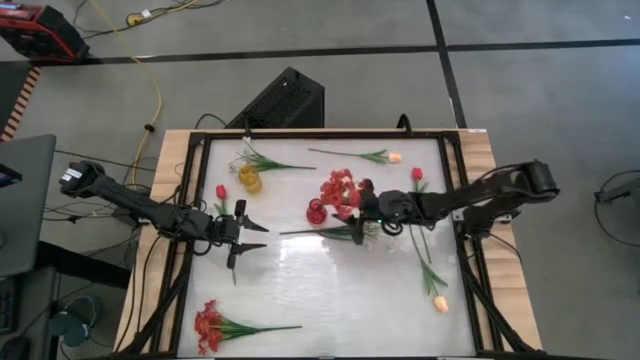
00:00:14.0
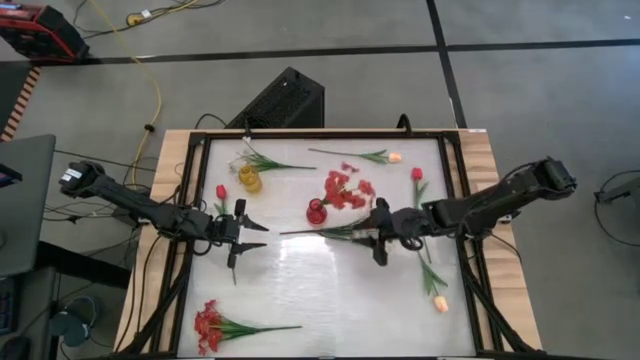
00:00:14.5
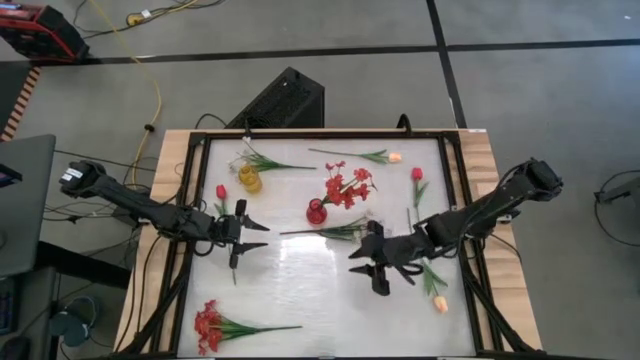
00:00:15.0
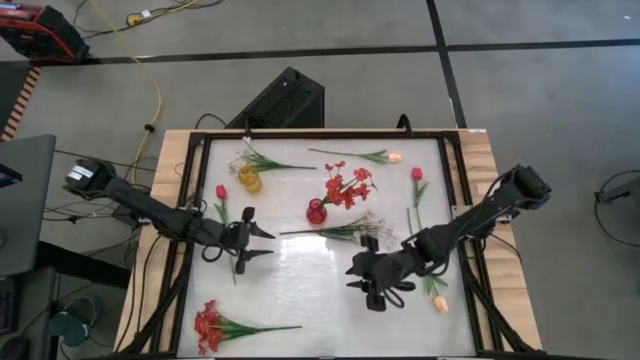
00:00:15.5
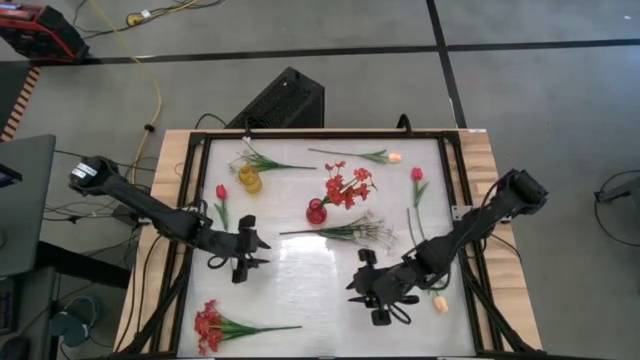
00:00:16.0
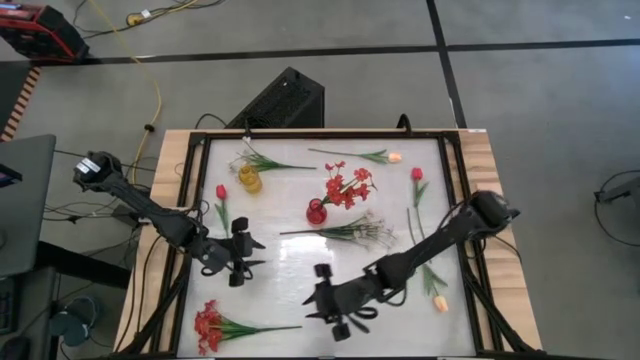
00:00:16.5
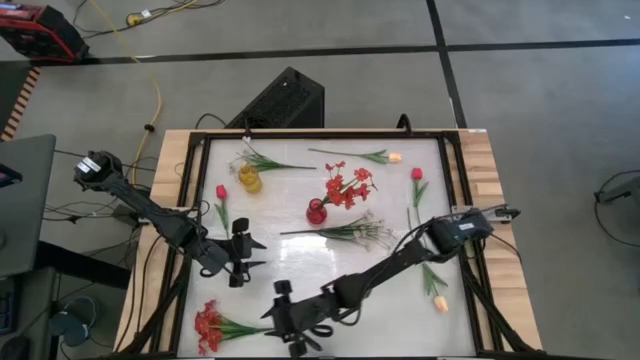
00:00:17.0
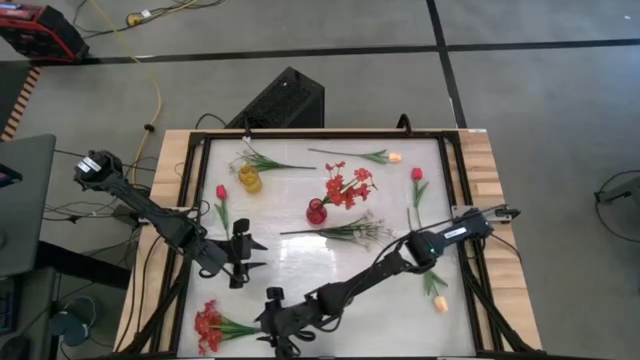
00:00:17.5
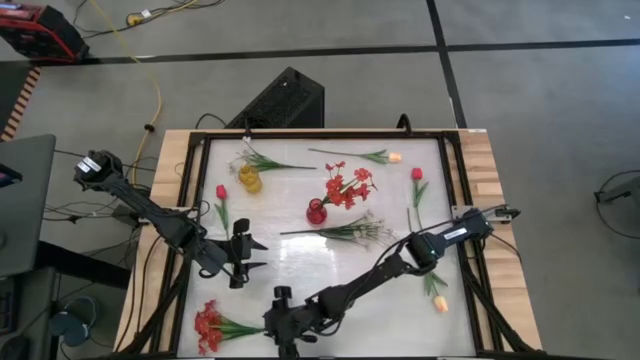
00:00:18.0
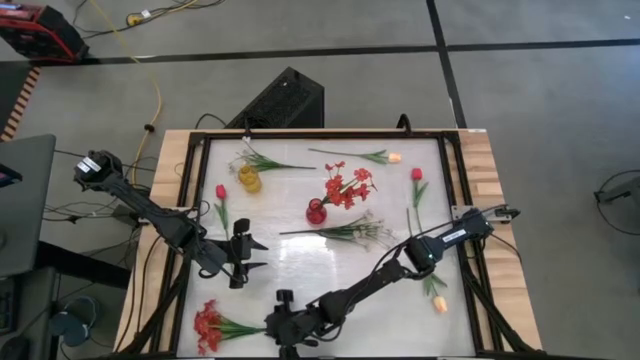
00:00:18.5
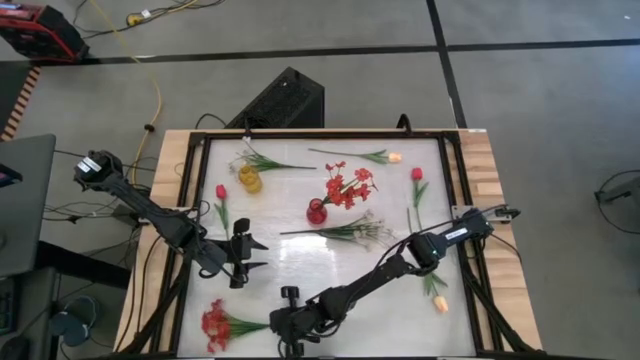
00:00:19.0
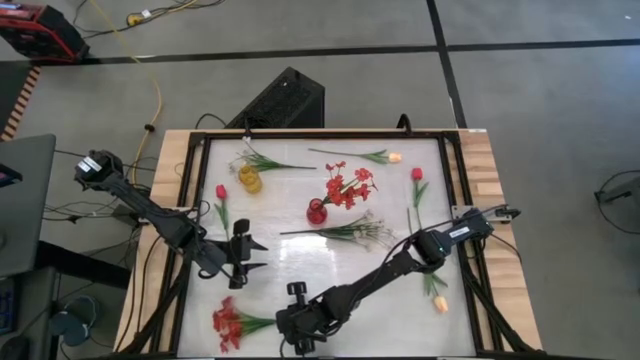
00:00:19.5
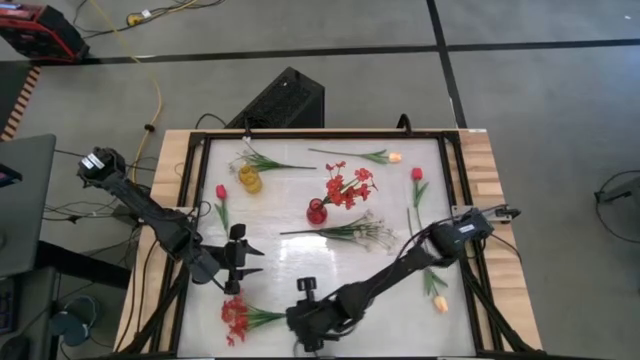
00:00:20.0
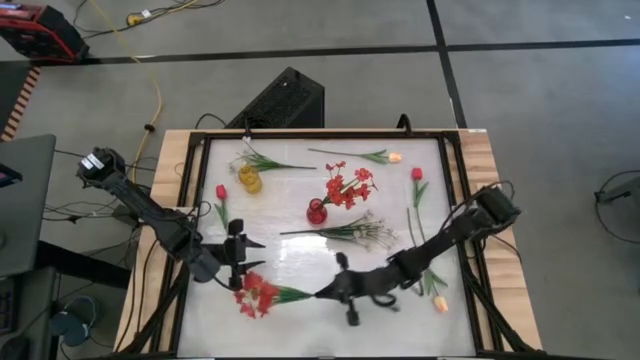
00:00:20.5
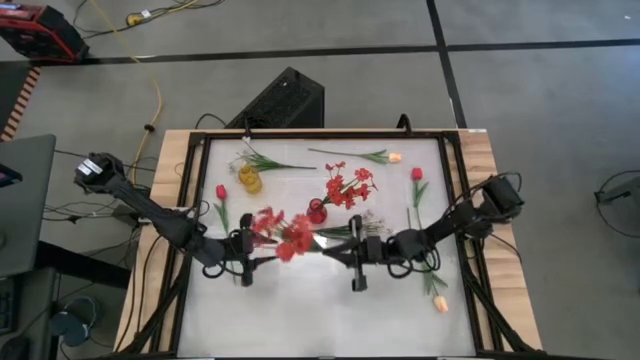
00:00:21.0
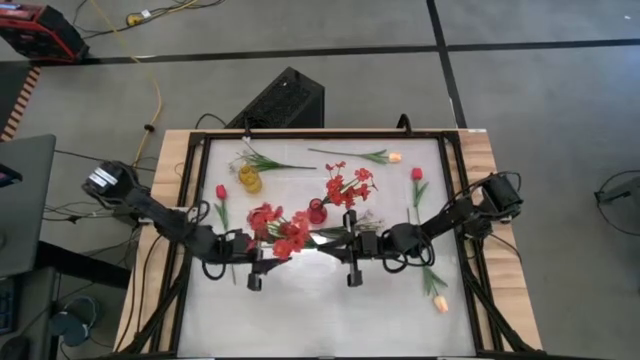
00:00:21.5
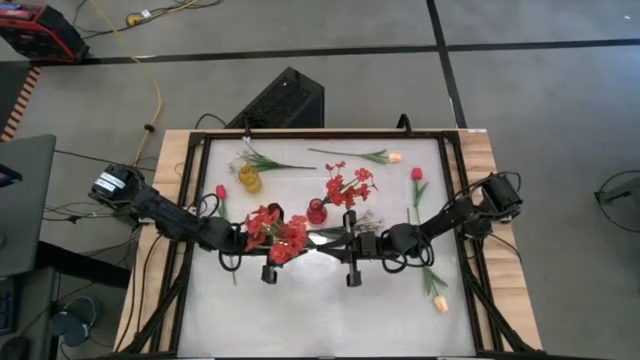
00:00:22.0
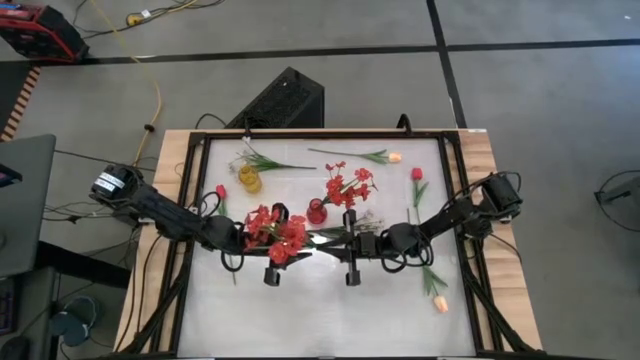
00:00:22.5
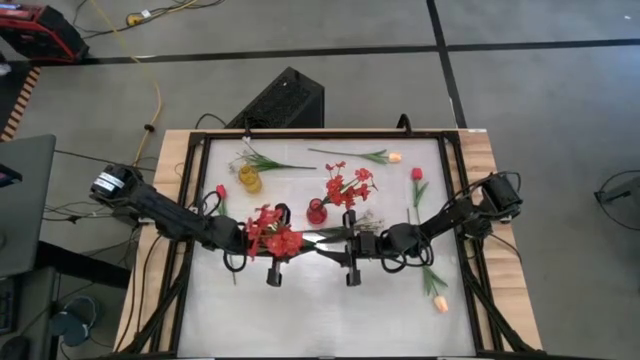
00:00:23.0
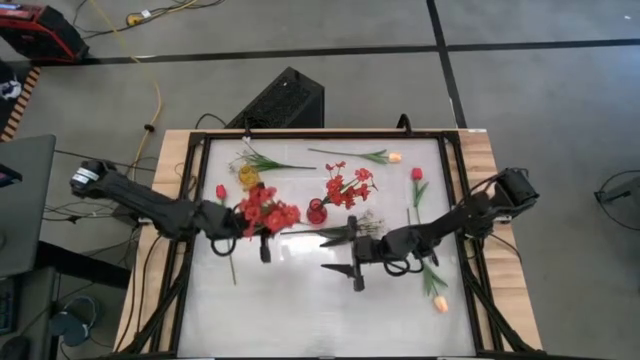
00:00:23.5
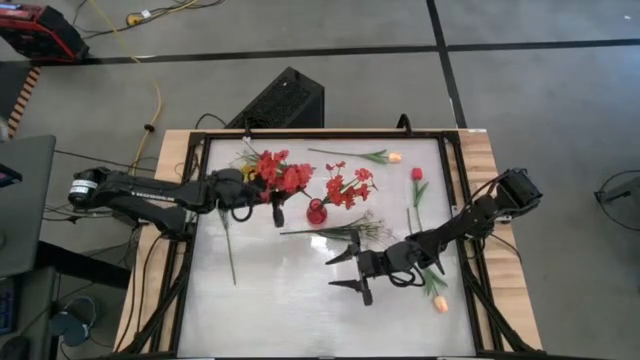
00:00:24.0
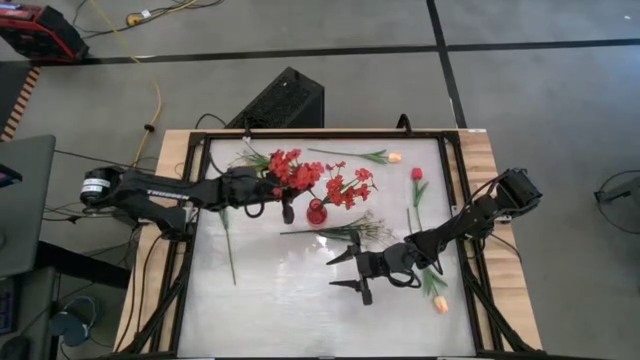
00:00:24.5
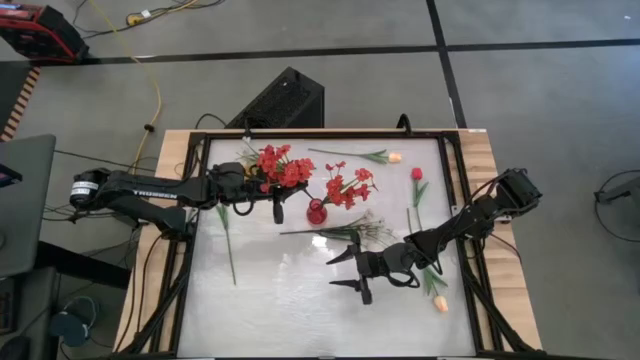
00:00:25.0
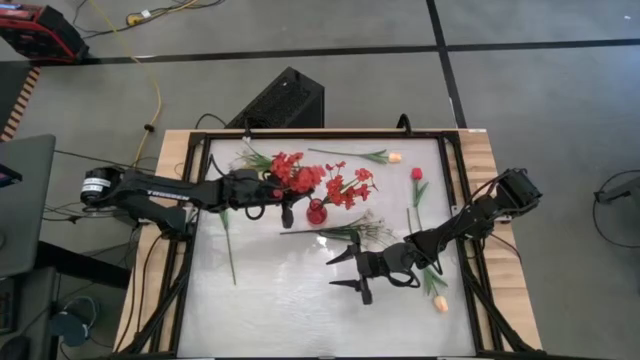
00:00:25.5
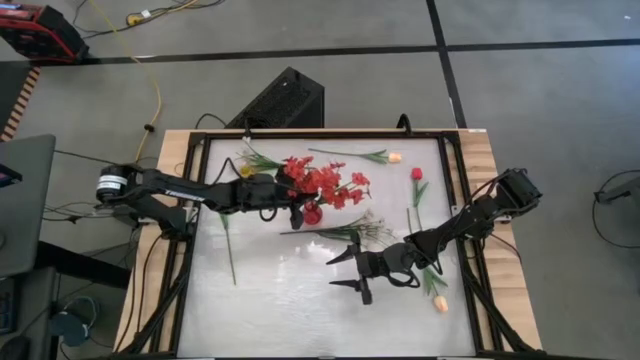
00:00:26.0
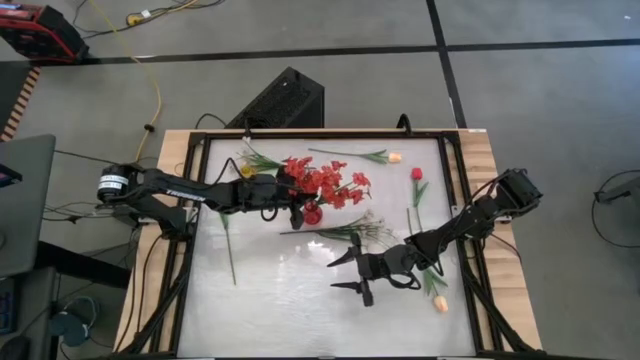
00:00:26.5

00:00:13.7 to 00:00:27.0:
Task: Sort flowers into vase by color
Put the orange flowers into the red vase
